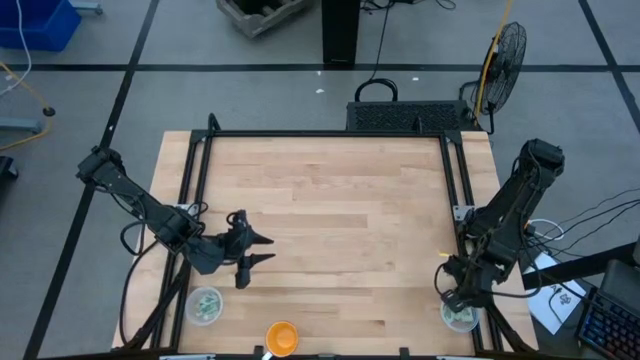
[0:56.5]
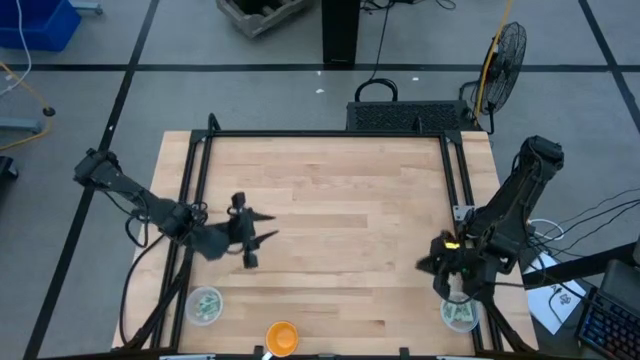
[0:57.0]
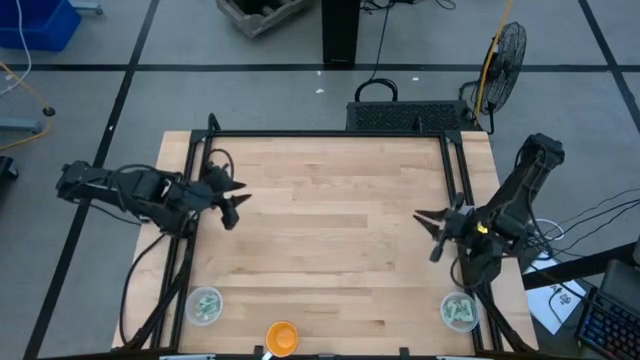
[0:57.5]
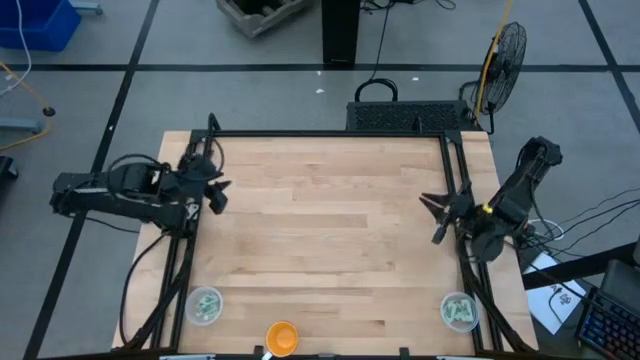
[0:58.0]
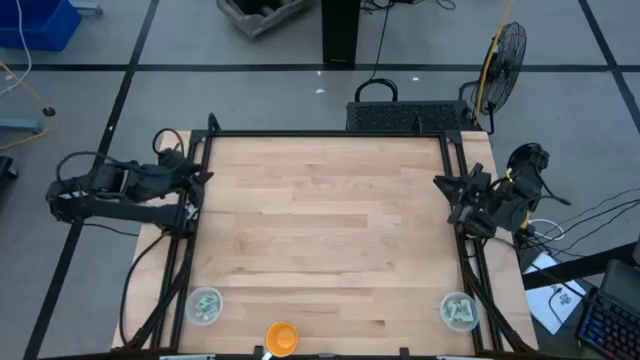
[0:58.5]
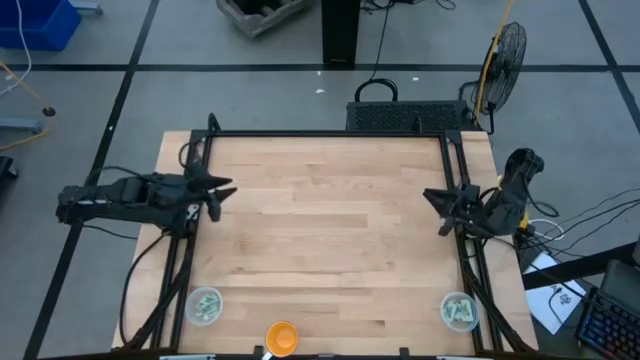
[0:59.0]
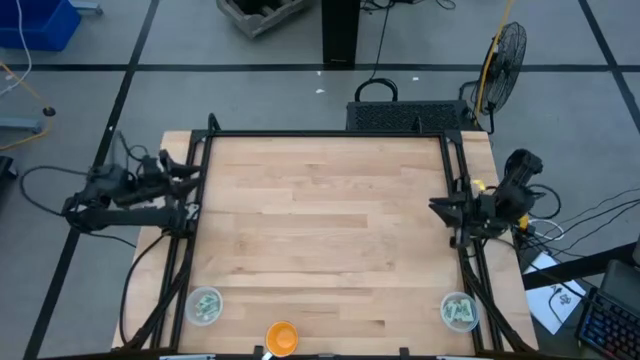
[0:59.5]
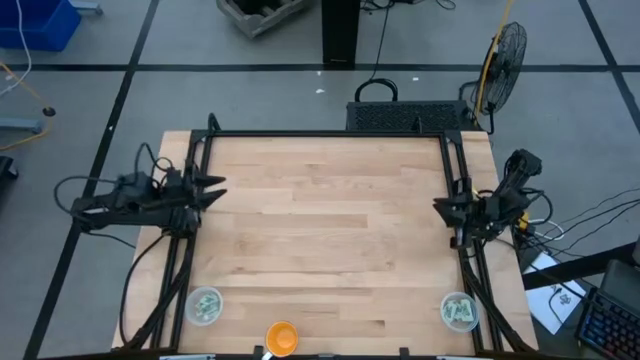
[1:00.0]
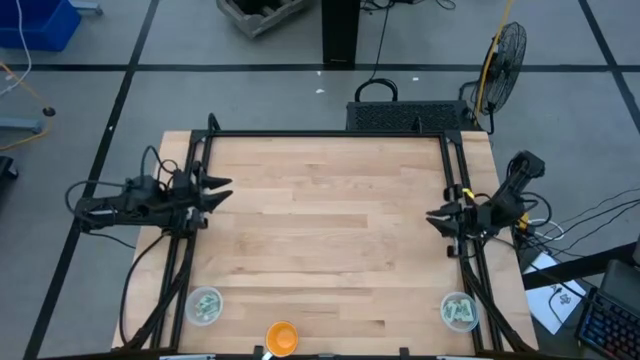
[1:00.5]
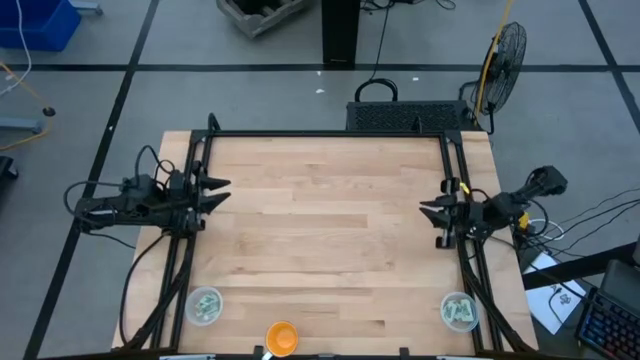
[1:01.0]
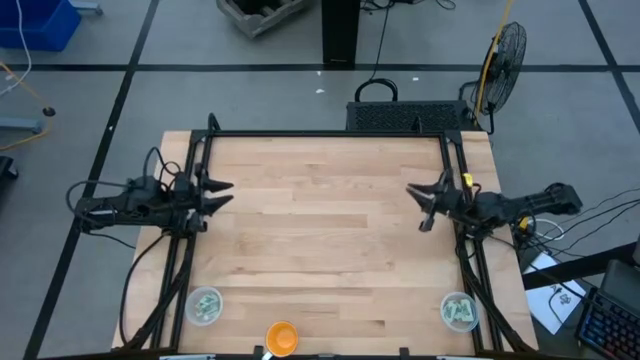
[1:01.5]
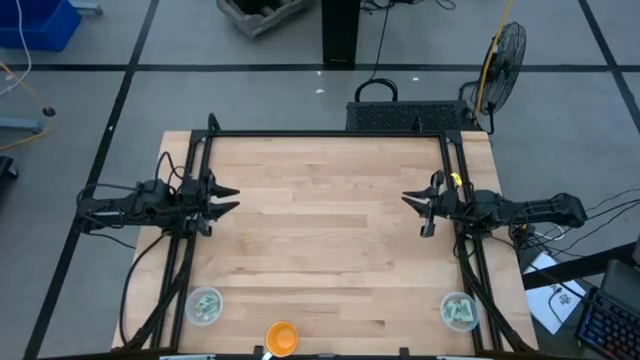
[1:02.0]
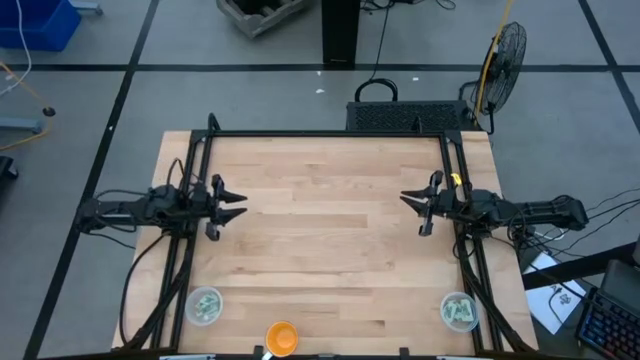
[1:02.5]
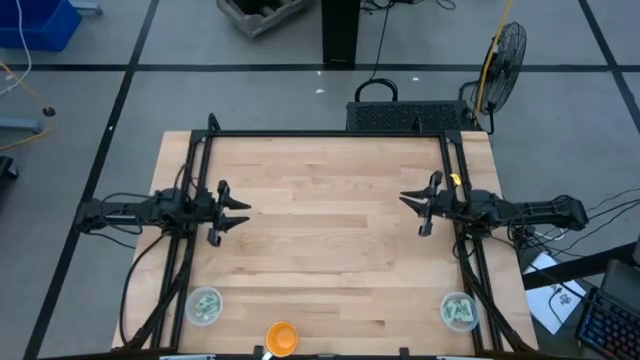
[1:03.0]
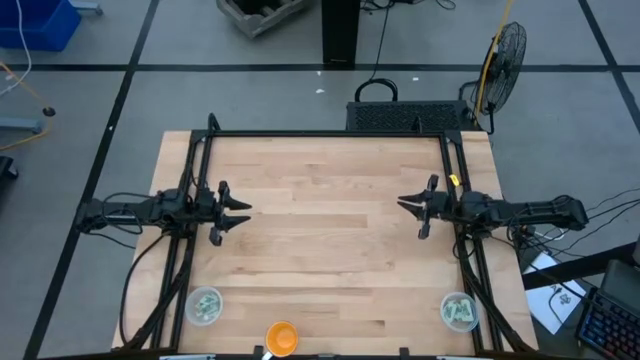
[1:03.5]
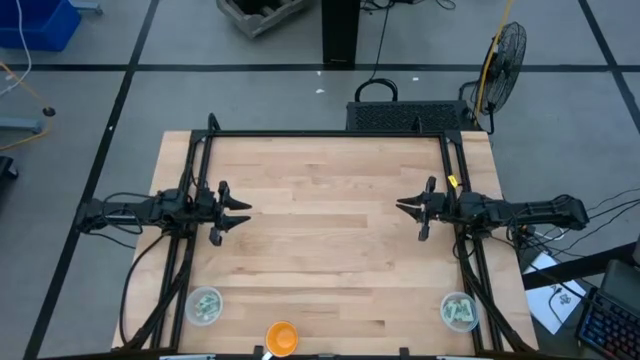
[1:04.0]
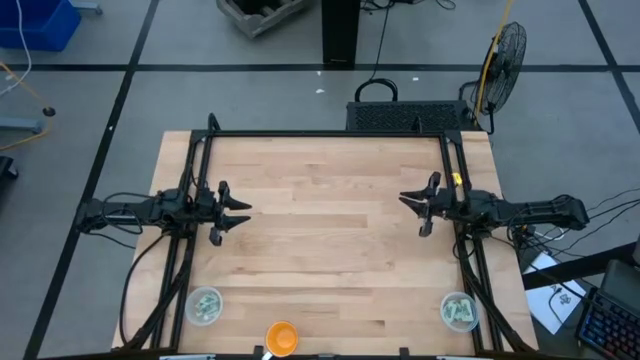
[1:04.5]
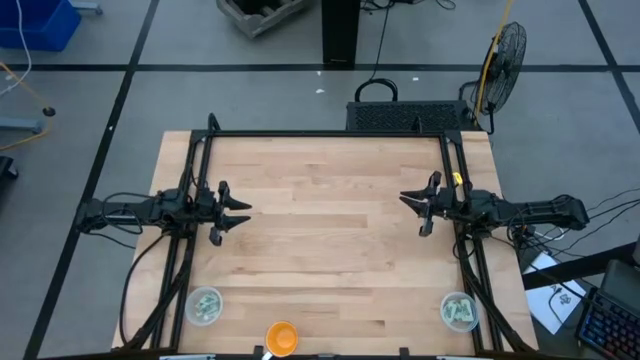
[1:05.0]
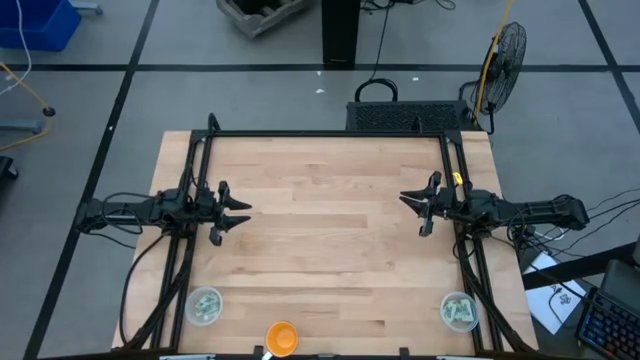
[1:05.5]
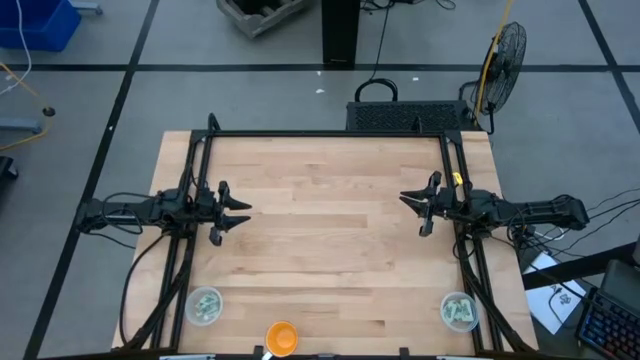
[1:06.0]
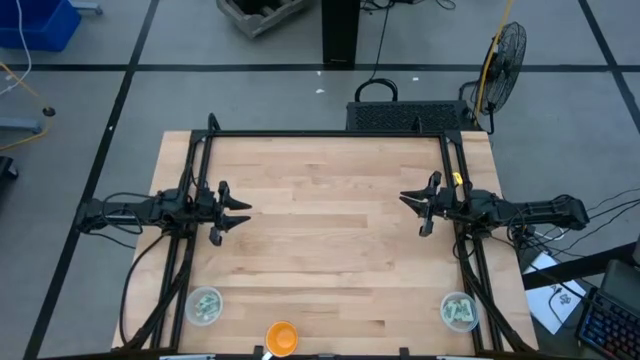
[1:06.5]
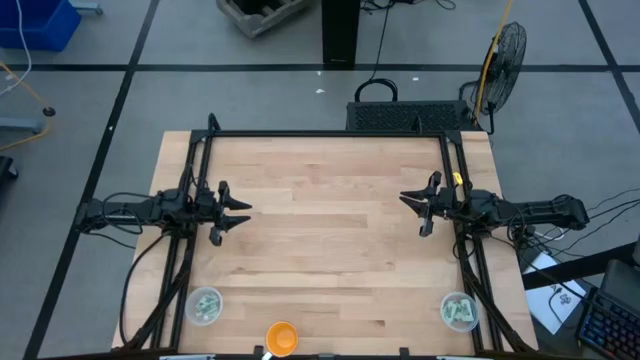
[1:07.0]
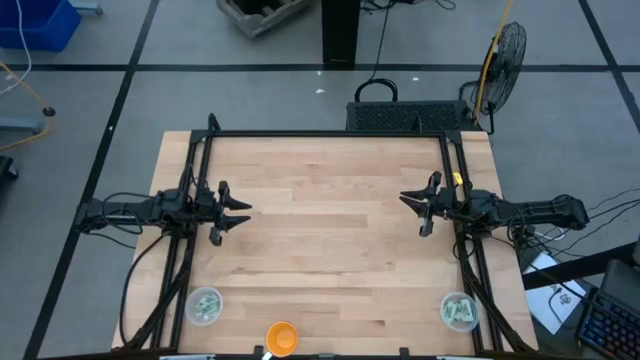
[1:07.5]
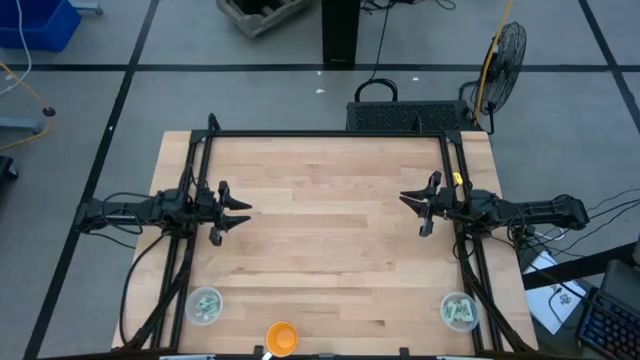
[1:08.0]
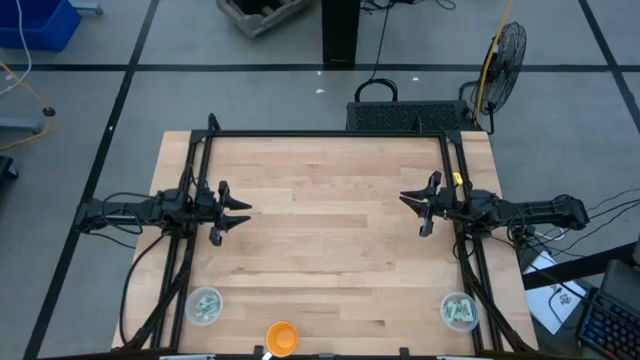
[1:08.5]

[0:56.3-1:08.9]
Task: Pick and place Stevia / Truvia into bins
Return to Home Position

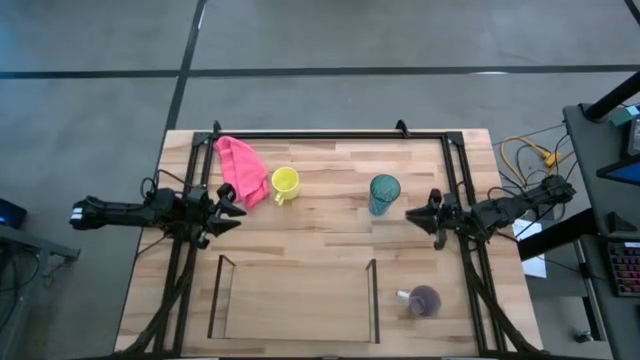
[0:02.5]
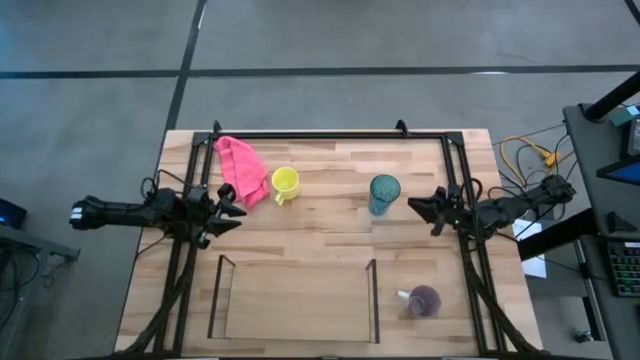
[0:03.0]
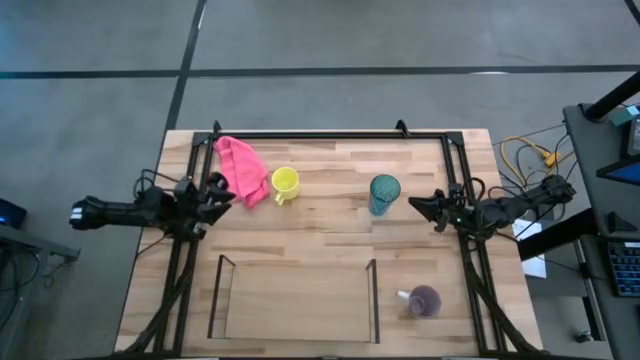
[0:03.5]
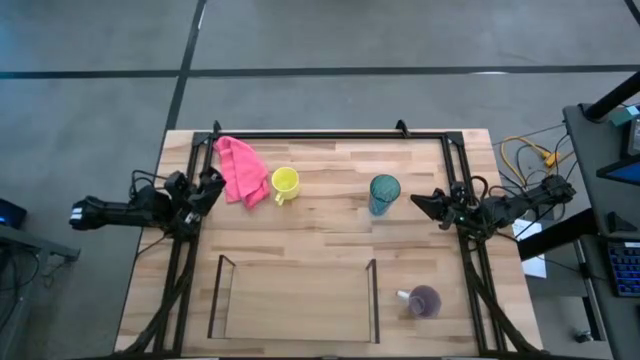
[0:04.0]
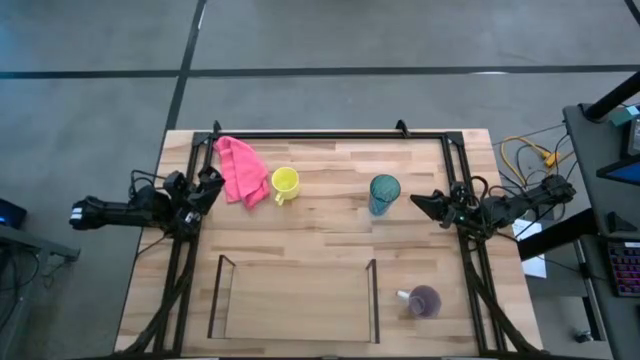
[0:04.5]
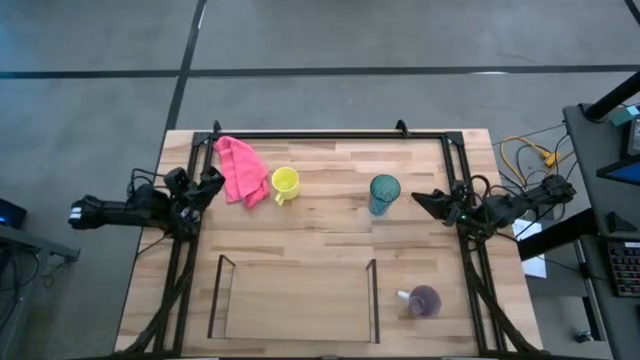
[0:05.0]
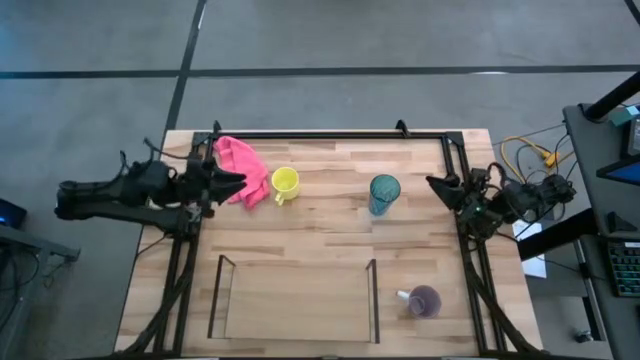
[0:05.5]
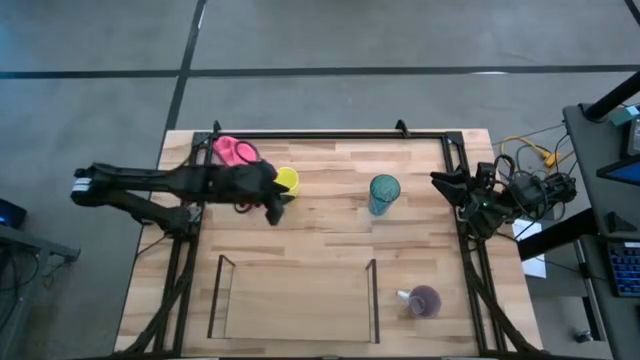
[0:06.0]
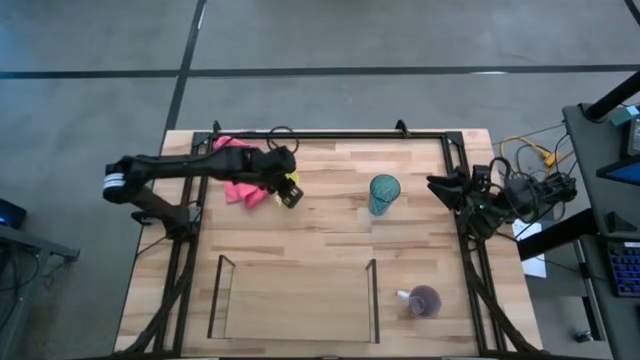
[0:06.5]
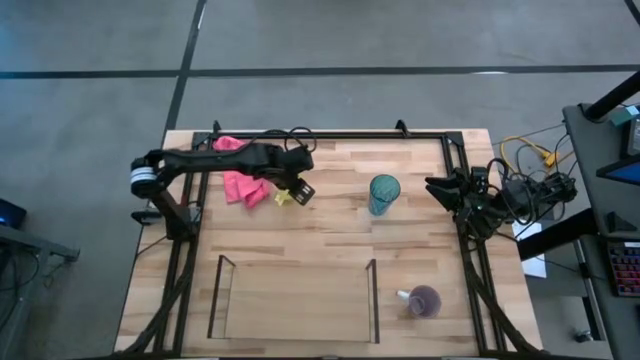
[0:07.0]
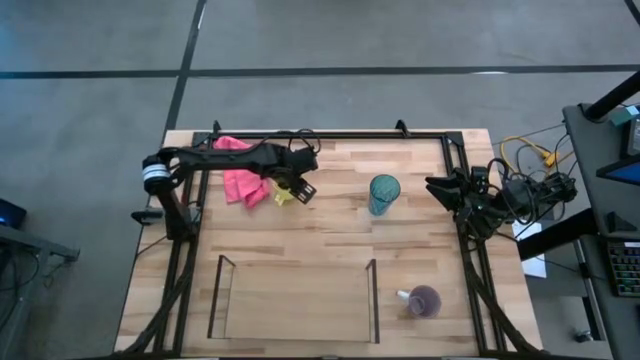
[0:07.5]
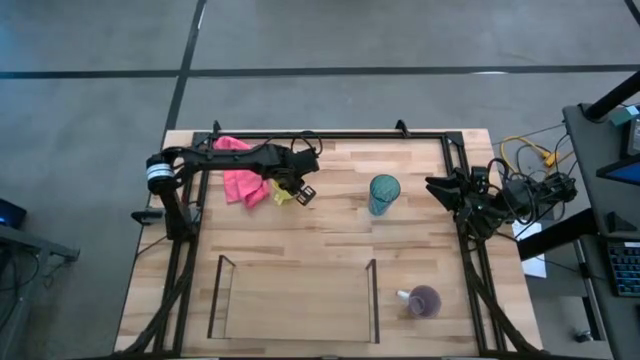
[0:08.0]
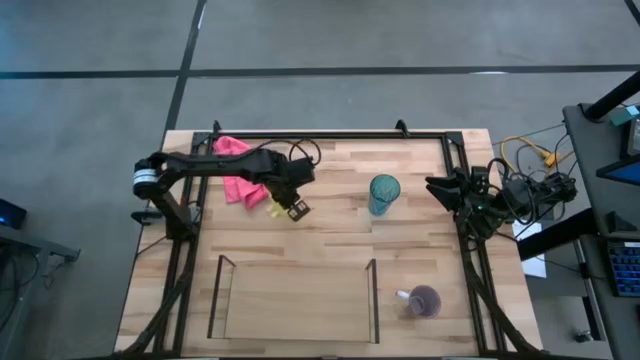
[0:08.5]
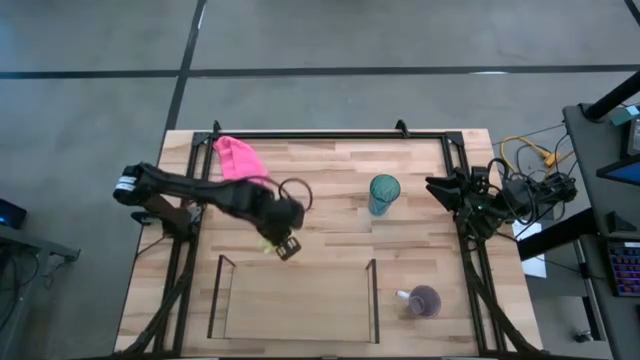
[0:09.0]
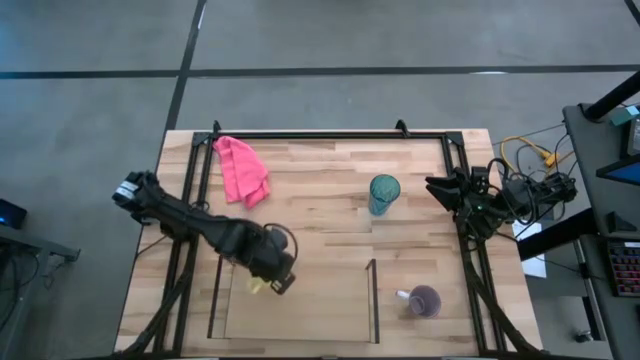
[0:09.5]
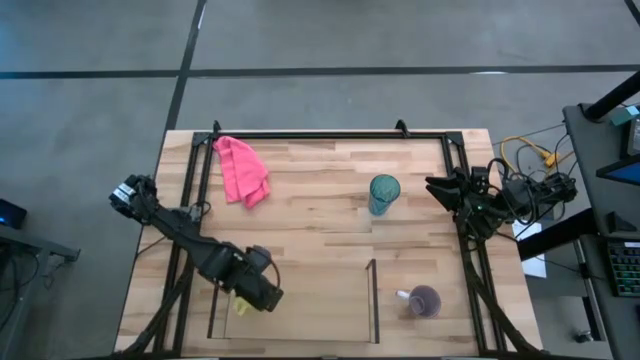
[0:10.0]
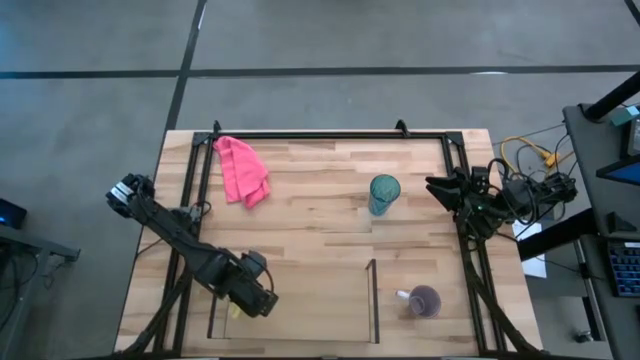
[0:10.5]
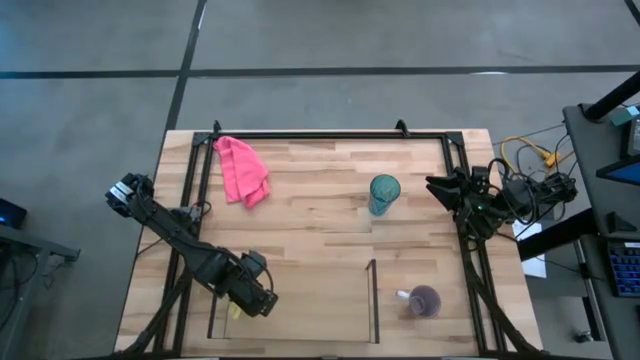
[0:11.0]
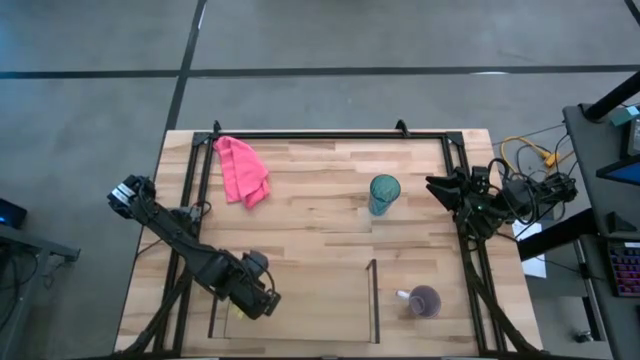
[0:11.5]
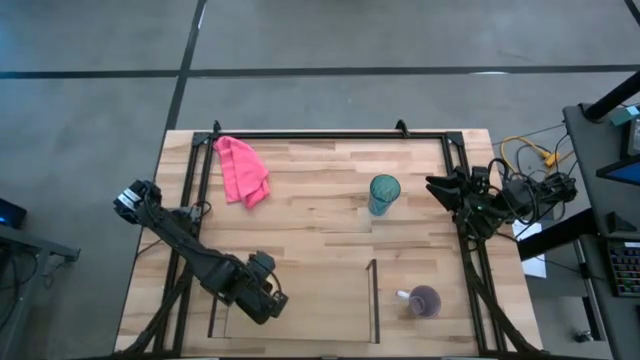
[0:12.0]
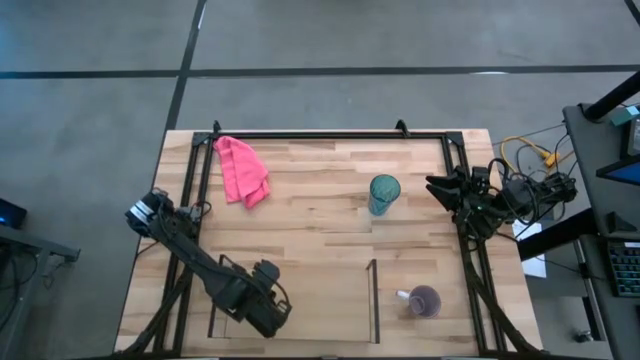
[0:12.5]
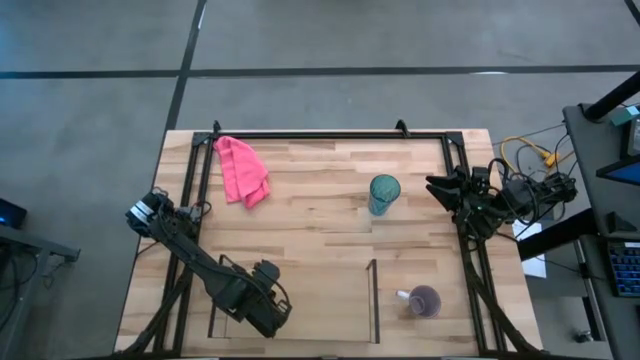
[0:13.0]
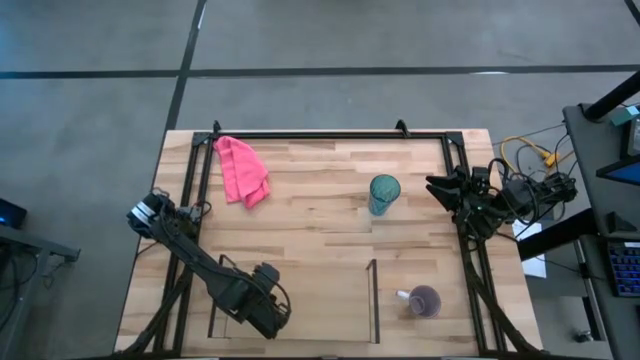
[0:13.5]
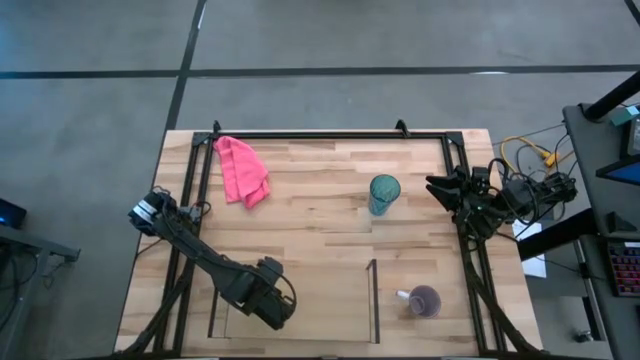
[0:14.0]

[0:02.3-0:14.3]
Task: Stack small to large cups/mugs on shelf
Put the yellow mug on the shelf
